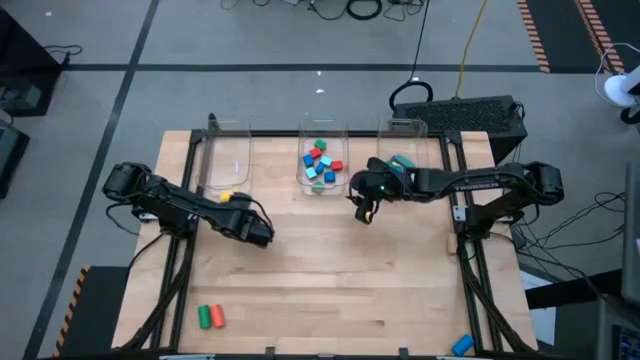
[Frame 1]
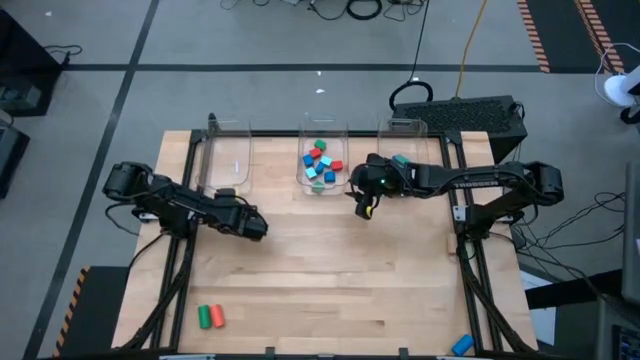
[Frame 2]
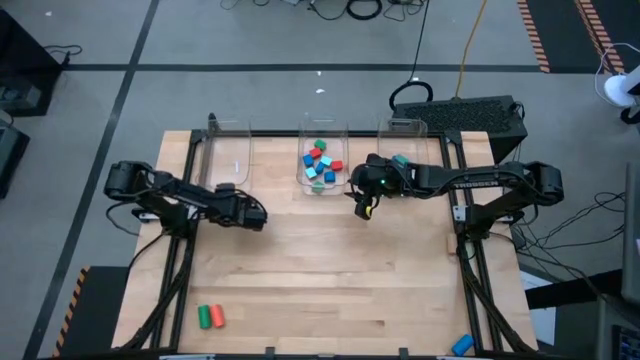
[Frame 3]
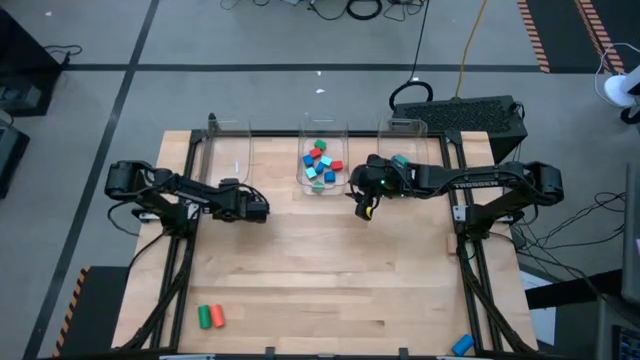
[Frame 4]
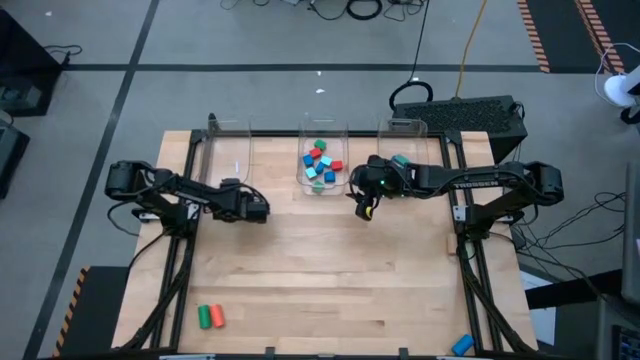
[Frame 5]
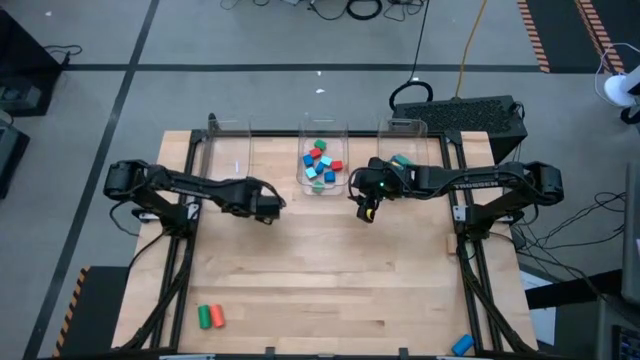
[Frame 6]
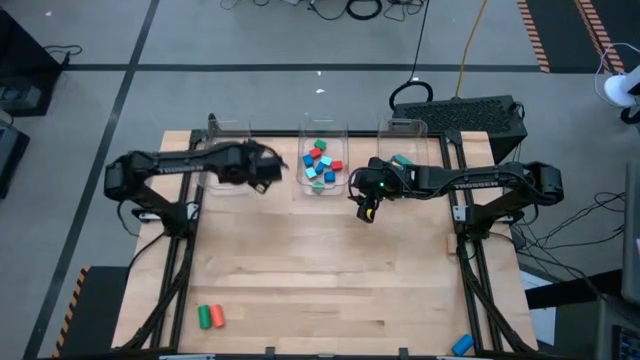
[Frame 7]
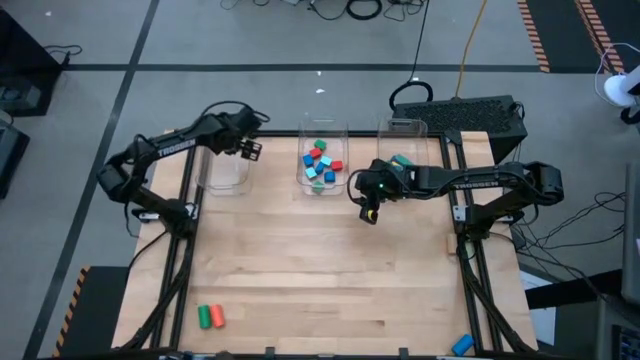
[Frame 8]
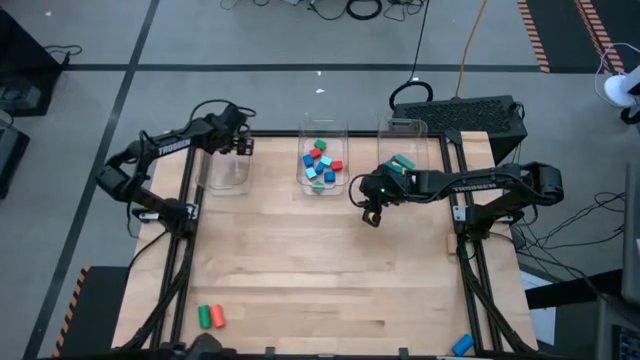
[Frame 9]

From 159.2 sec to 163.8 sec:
Task: Sort blocks by size
Put the yellow cylindrical block into the left transparent bin

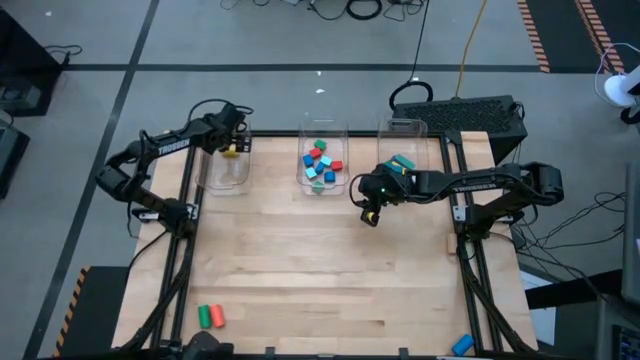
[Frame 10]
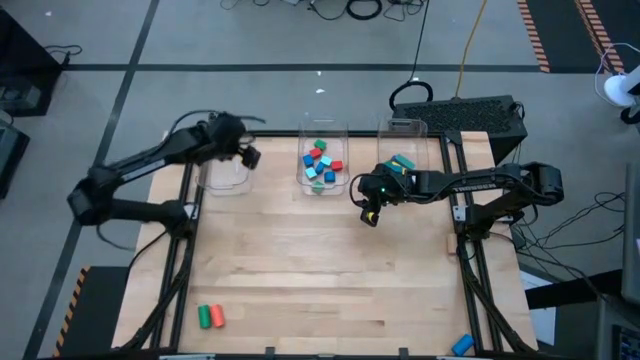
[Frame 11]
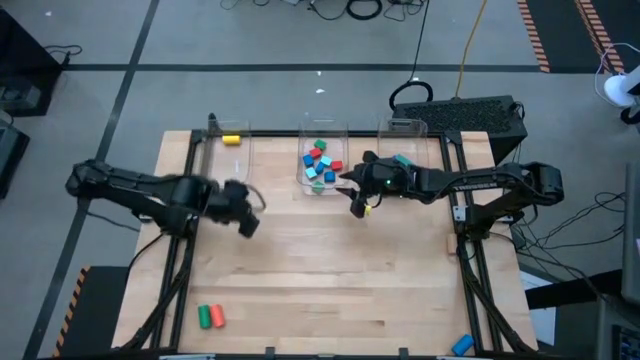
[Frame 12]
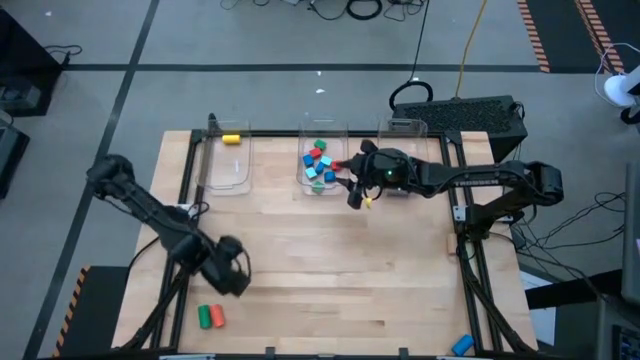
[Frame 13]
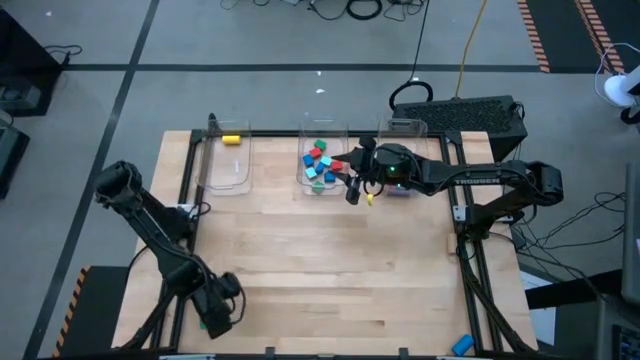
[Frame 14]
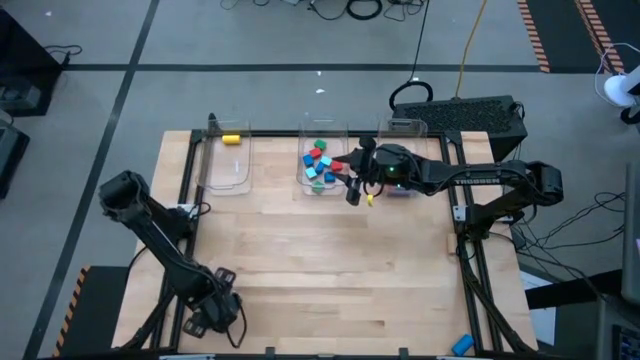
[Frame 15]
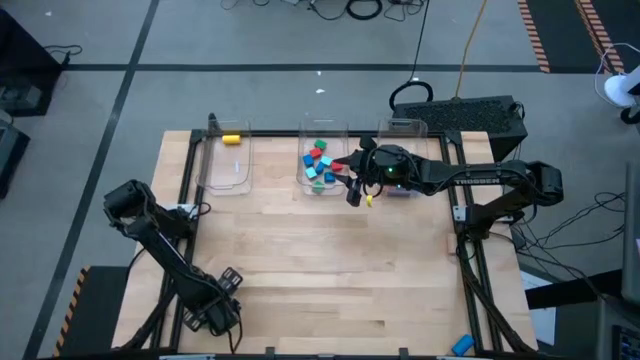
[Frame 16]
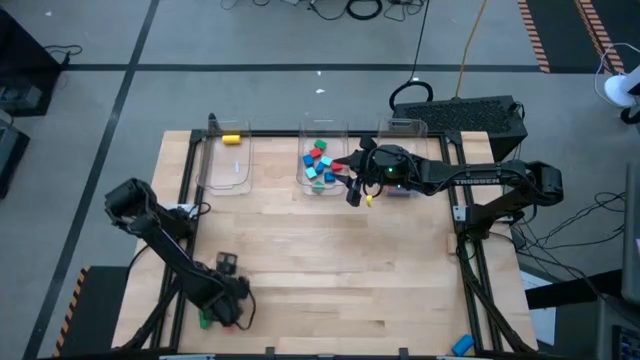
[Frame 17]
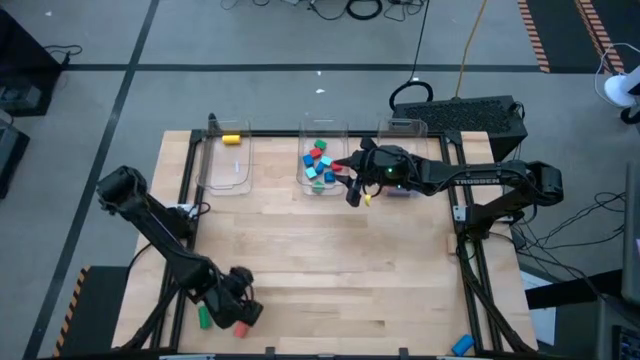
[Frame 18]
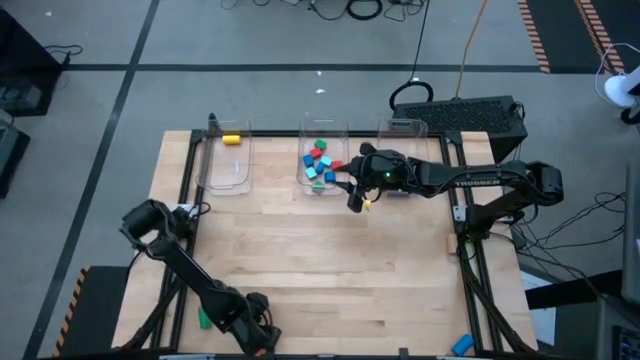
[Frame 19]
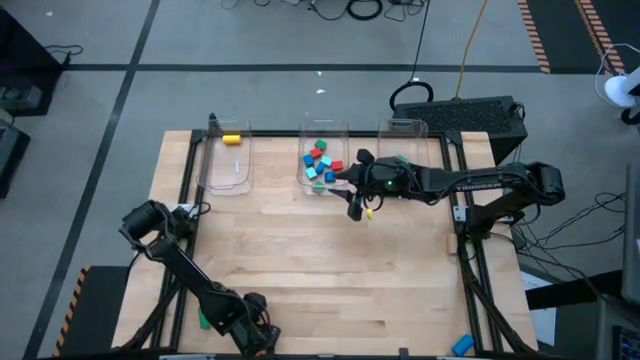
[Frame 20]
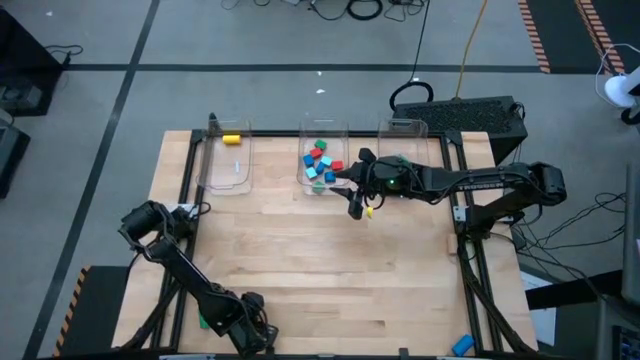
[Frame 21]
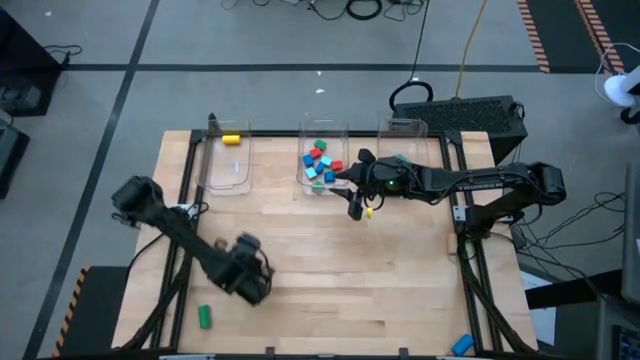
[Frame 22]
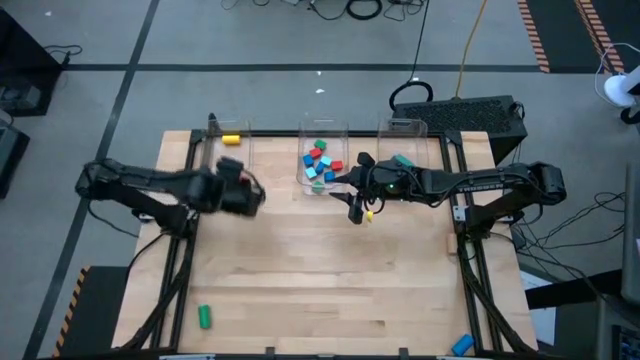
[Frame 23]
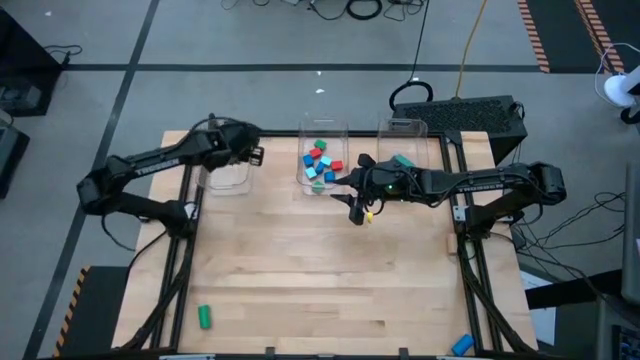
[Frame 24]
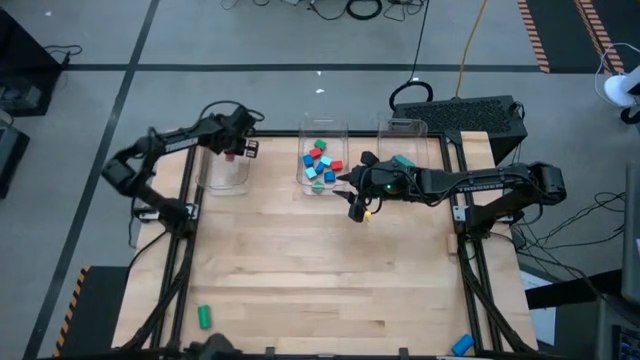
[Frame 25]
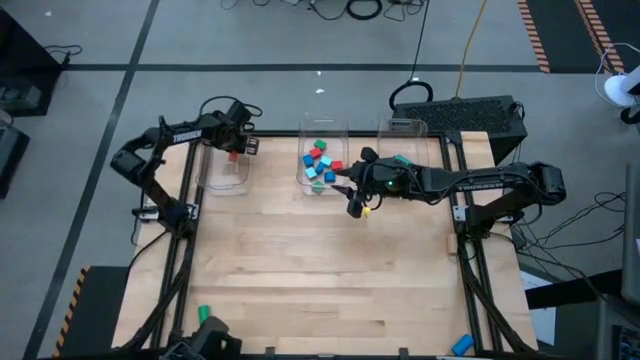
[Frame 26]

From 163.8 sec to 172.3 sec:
Put the orange cylindrical block into the left transparent bin

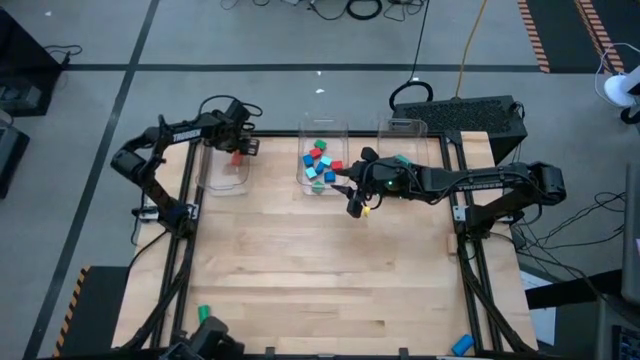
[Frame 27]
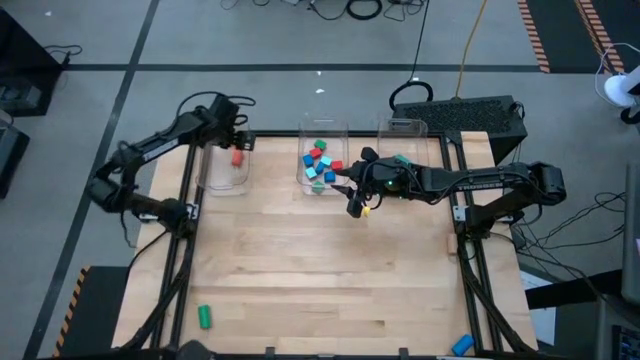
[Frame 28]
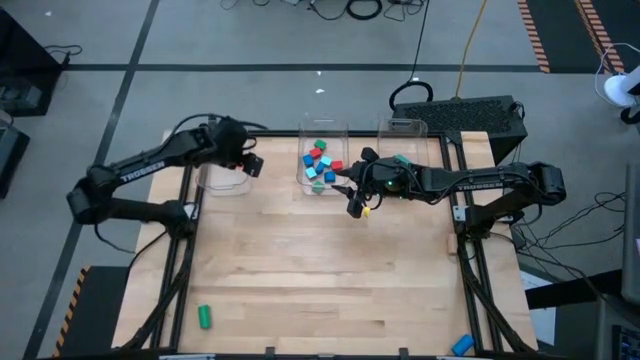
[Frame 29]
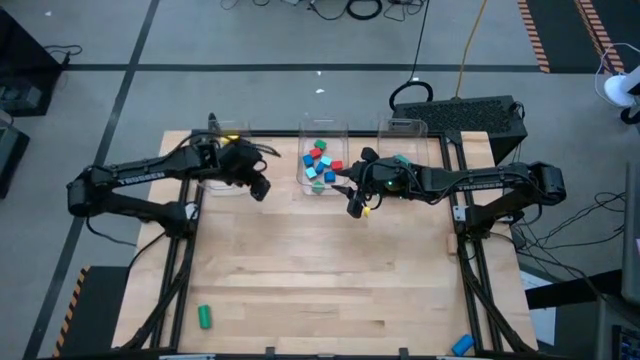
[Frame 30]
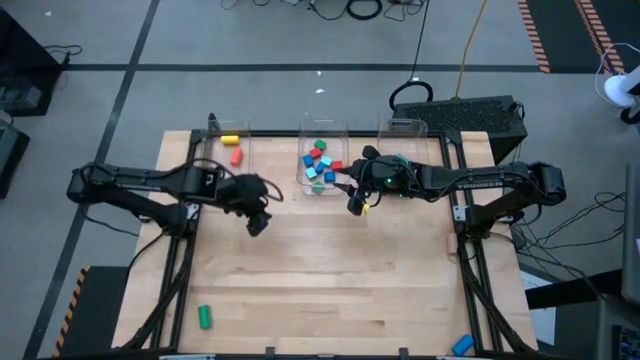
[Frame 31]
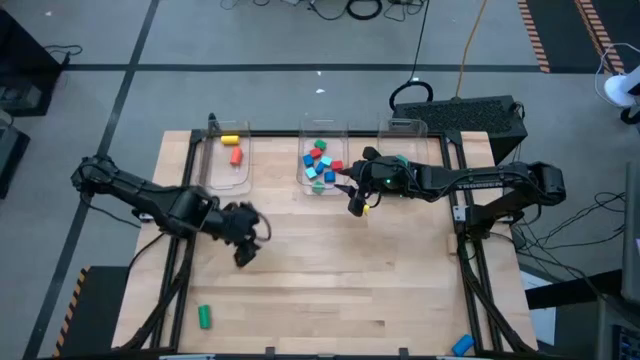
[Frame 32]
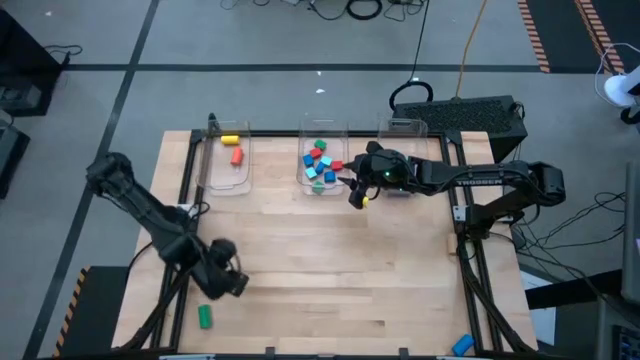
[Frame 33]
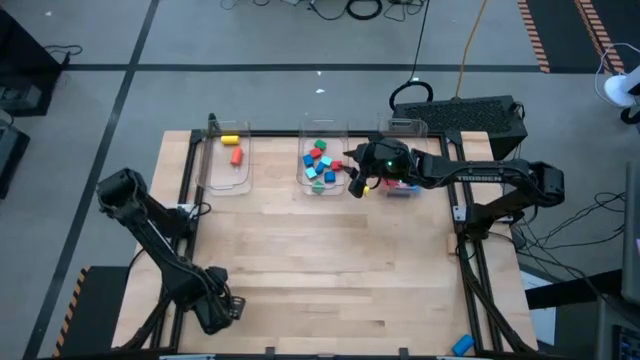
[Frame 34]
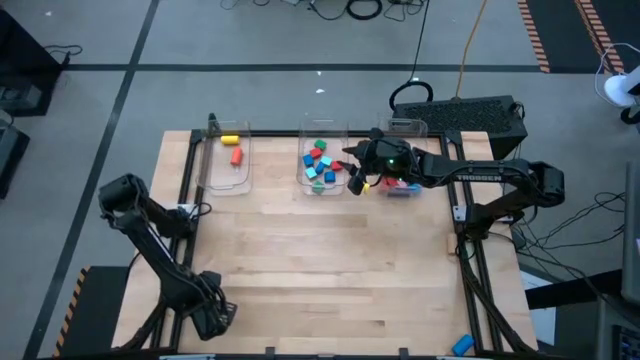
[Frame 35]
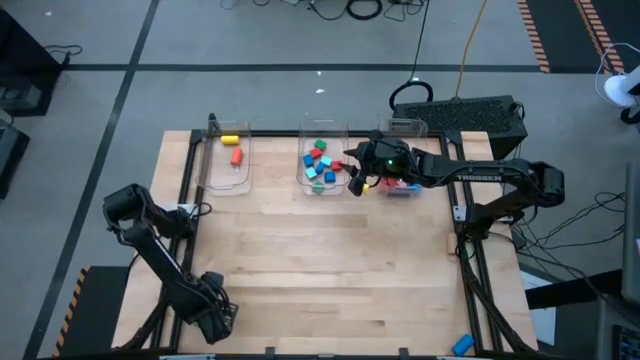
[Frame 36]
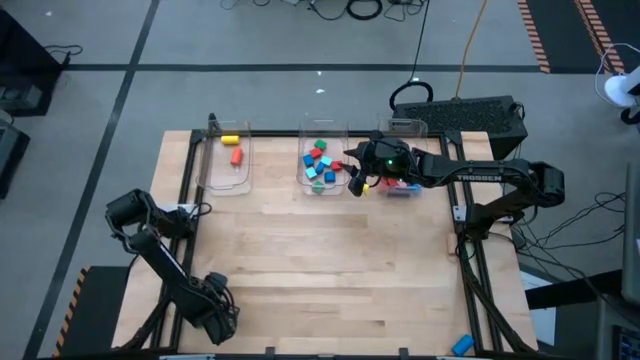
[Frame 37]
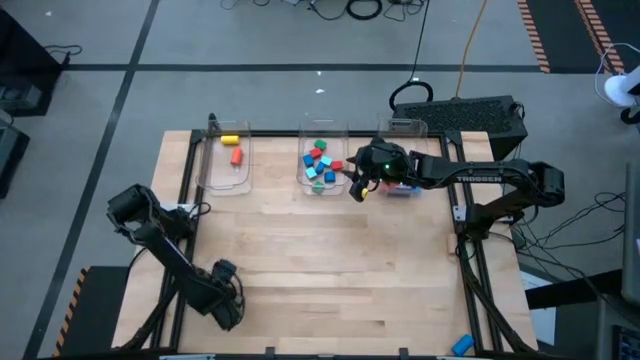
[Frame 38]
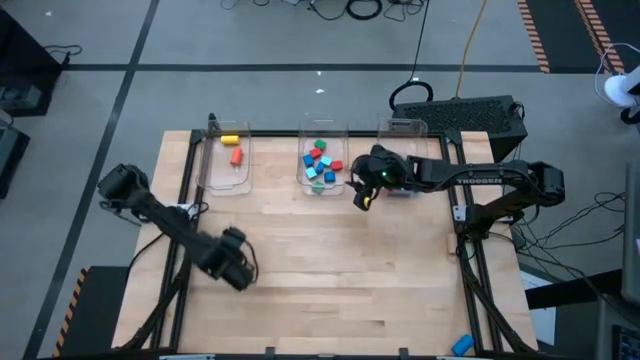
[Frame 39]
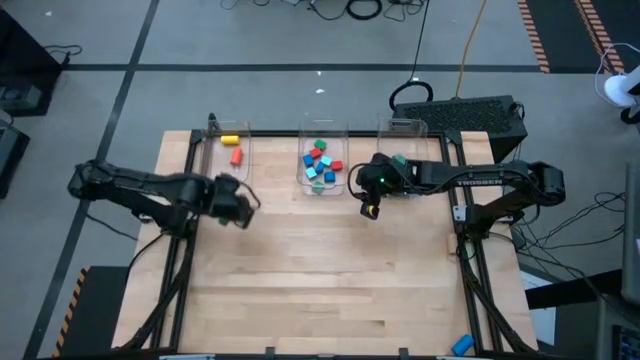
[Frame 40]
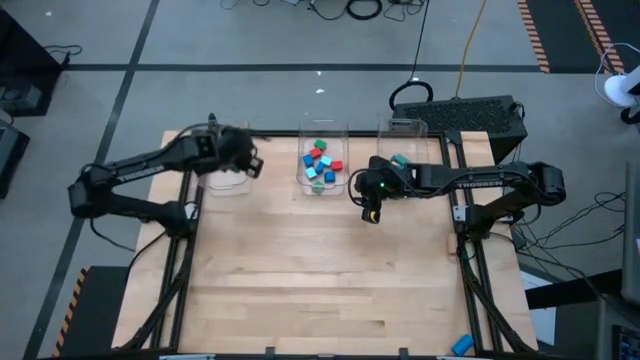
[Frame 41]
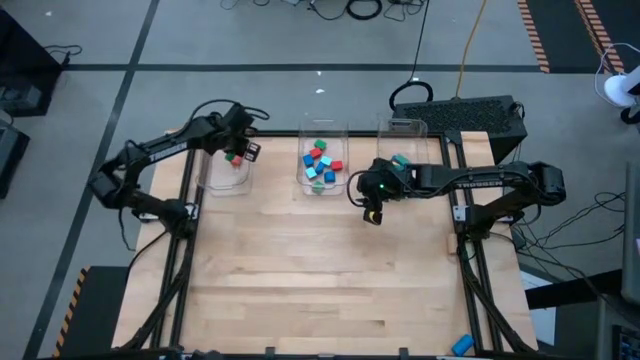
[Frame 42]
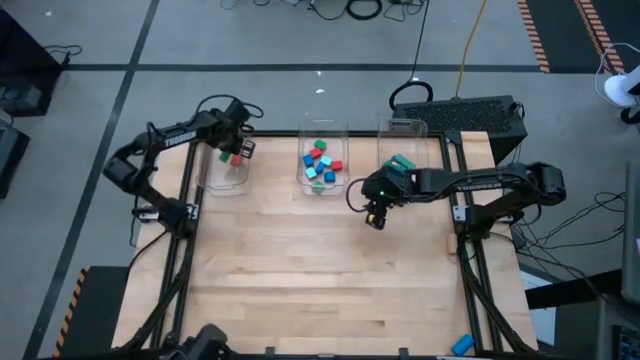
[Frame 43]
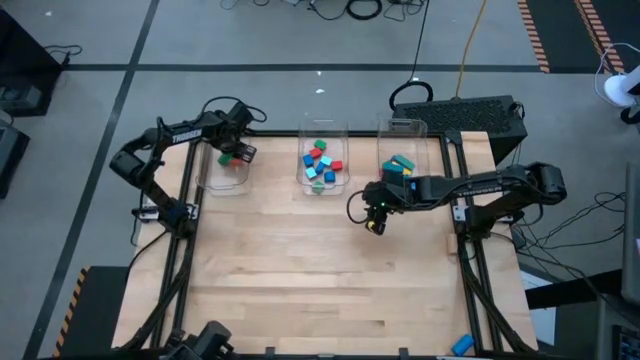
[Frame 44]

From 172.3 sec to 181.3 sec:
Put the green cylindrical block into the left transparent bin
